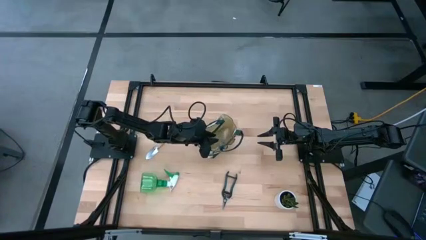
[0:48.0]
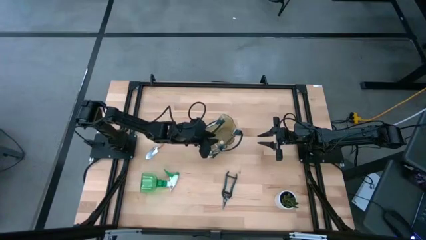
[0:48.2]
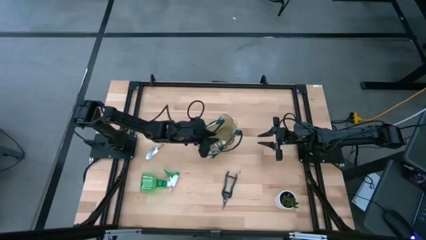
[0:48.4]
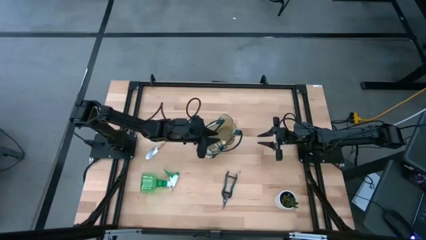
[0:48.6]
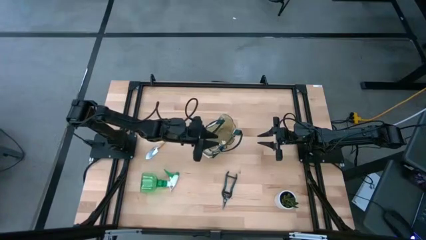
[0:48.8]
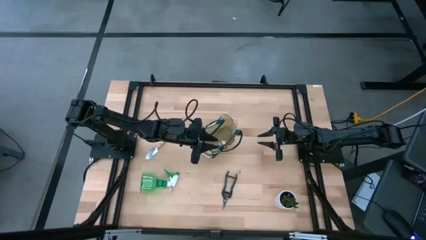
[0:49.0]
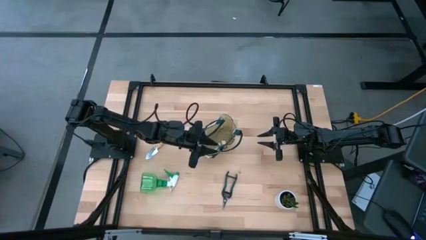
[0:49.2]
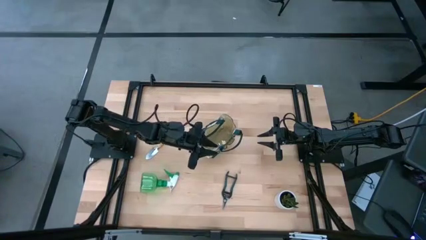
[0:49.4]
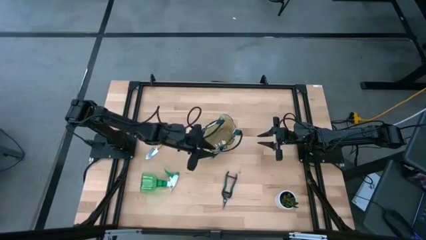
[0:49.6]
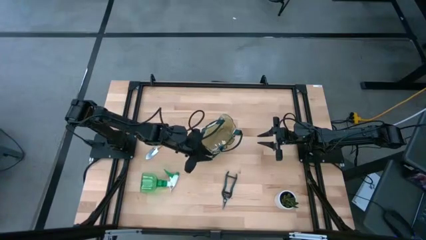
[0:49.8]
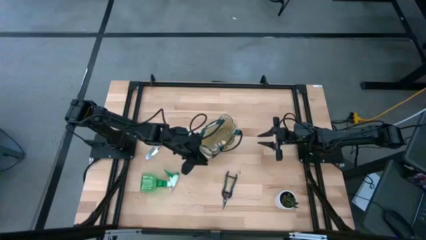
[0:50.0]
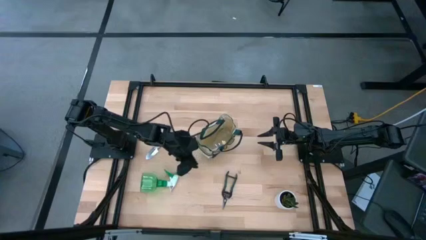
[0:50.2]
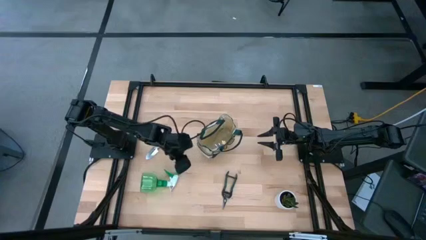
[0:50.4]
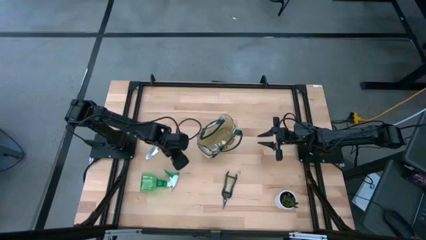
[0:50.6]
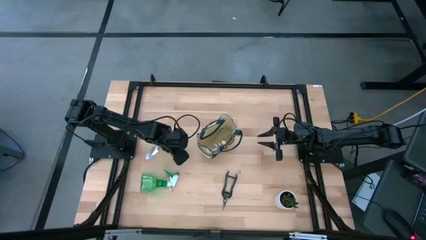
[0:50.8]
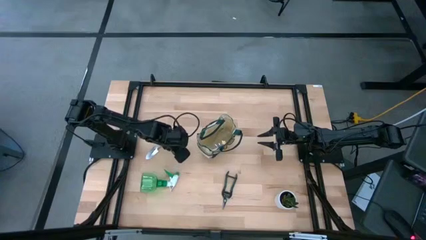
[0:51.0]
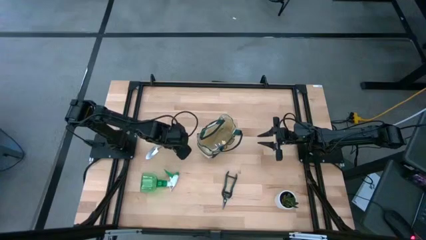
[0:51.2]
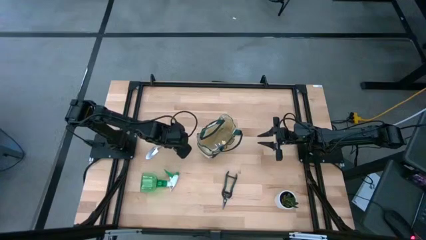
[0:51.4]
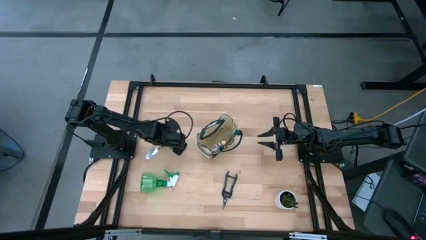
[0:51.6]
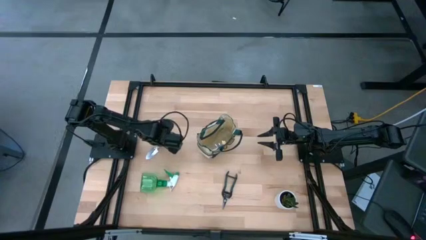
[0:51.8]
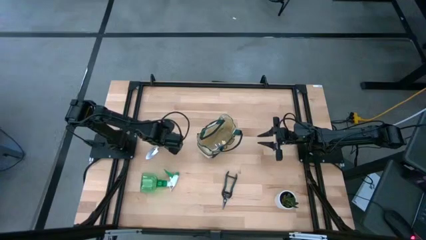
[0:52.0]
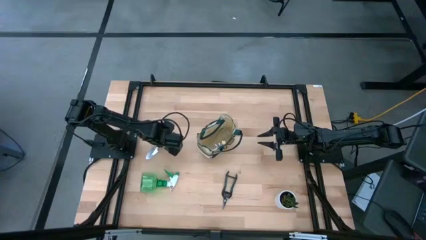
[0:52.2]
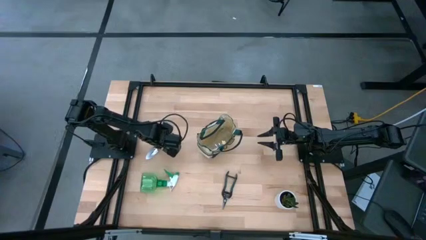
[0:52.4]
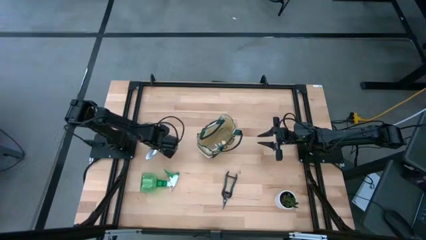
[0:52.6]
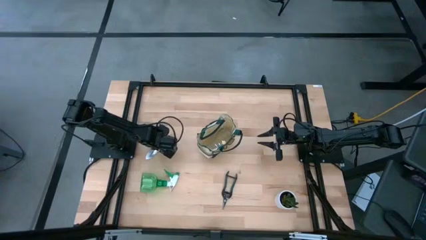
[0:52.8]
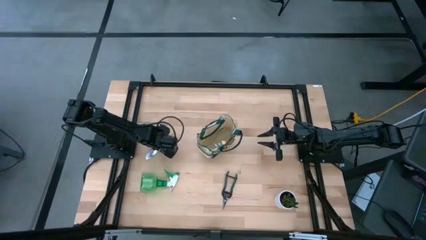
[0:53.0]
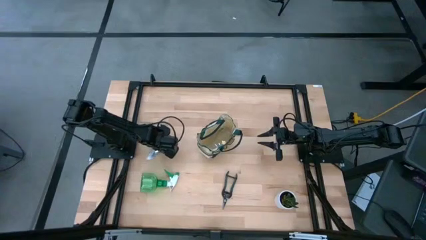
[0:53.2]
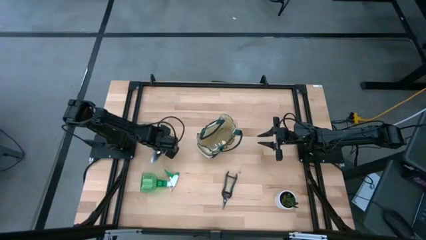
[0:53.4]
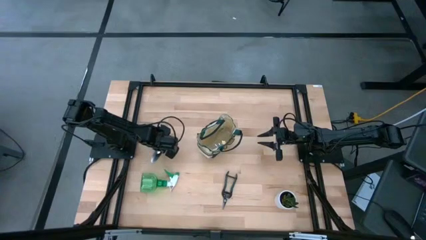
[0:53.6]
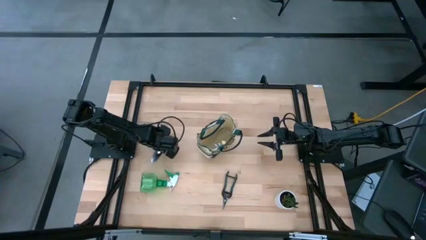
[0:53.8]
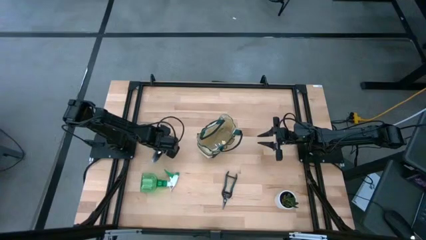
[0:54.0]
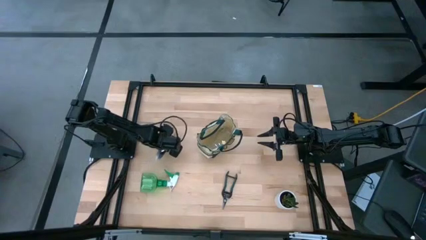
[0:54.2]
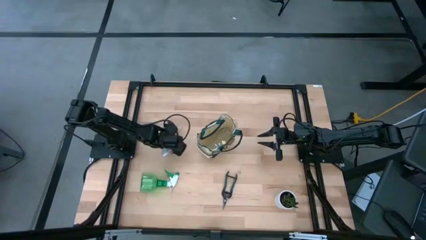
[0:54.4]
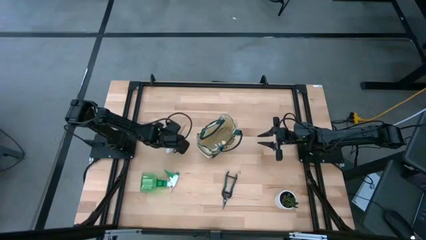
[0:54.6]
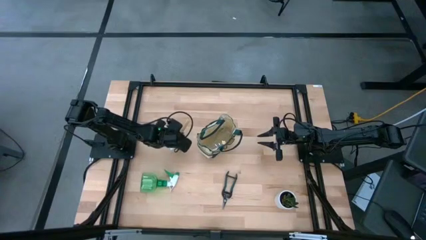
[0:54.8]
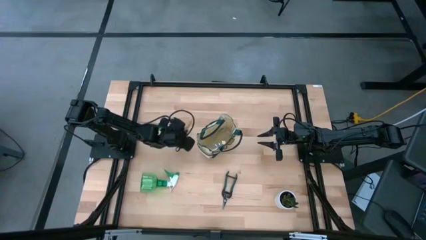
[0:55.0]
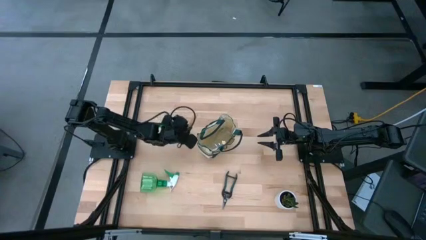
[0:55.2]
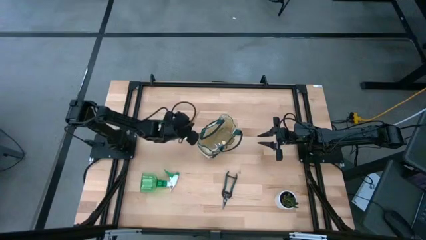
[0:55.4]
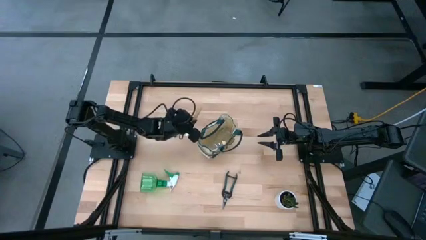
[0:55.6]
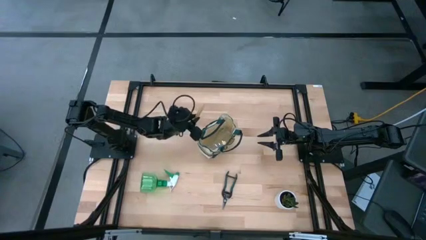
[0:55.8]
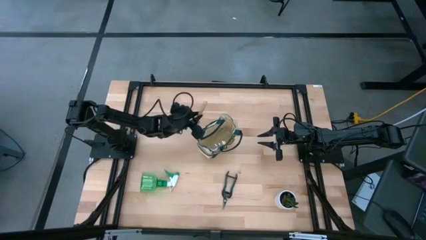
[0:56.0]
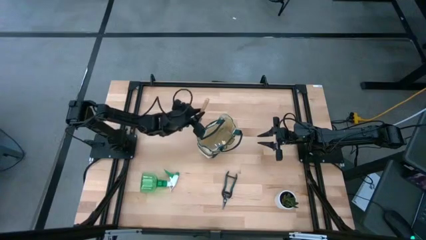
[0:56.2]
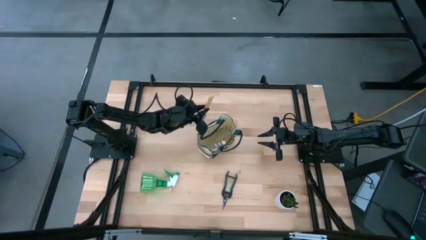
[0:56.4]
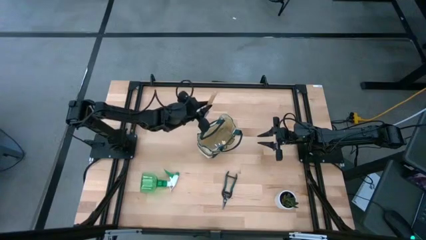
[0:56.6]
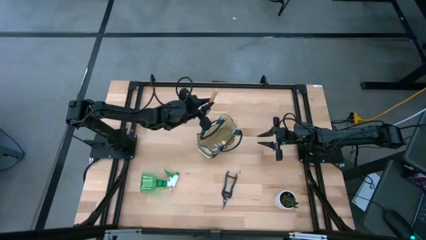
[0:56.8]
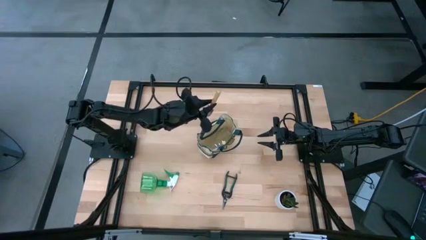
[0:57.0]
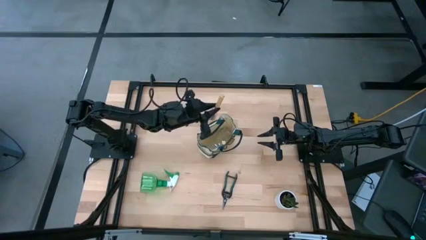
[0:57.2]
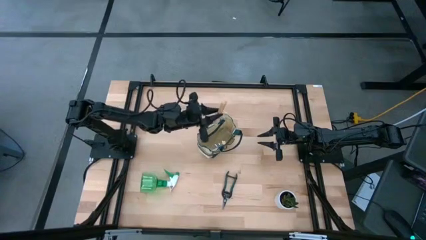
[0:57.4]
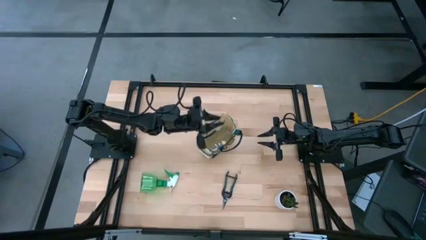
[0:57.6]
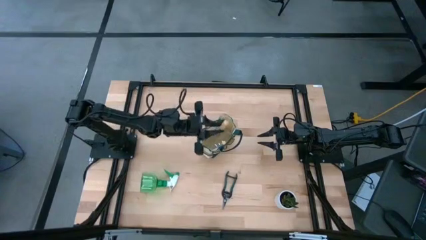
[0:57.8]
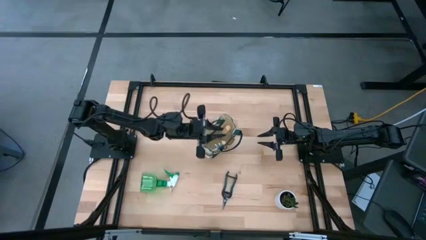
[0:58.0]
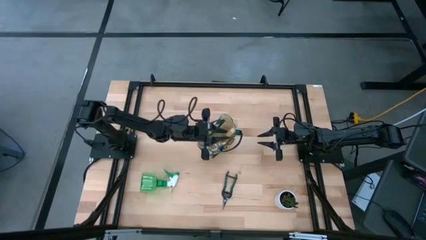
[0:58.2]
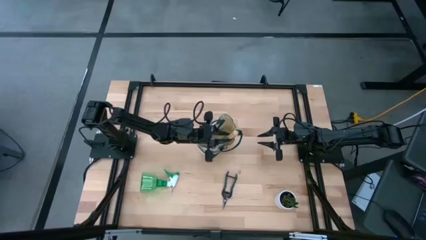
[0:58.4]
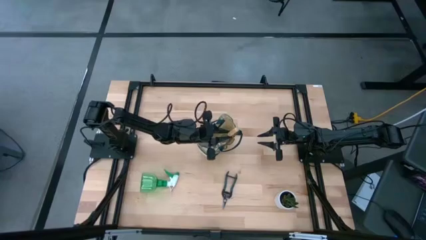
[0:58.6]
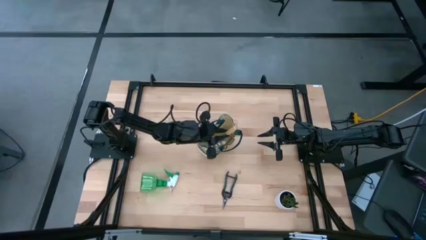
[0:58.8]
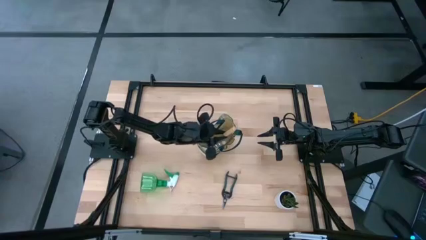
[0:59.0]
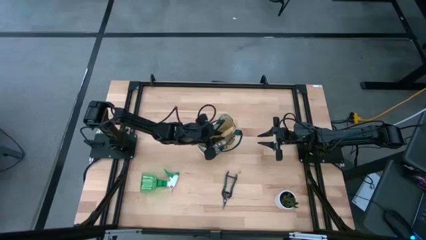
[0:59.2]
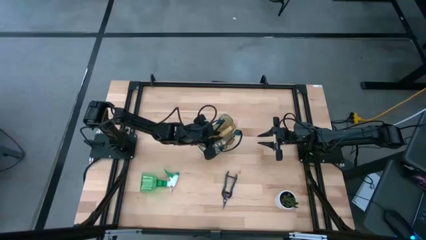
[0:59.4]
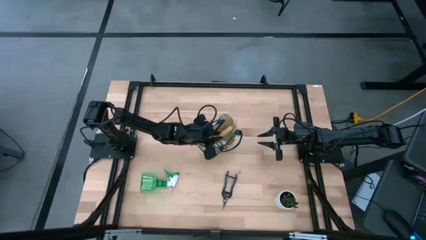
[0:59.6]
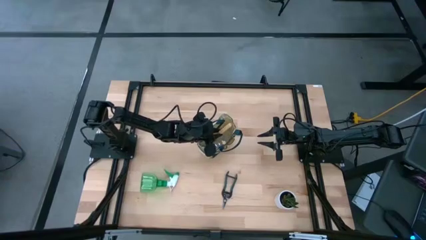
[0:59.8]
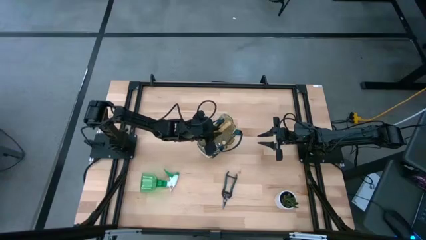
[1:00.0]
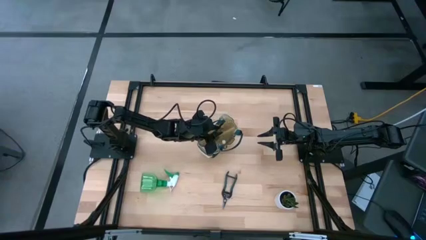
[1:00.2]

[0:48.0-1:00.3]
Task: Pick & Place Garden tools in Gardening bag
Put the trowel into the gardening bag

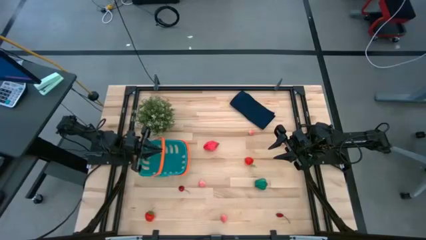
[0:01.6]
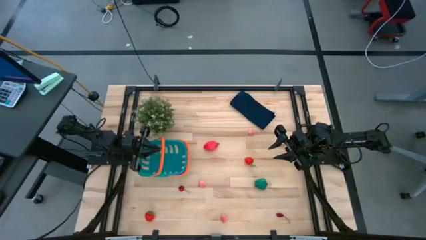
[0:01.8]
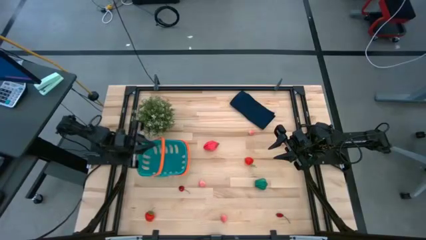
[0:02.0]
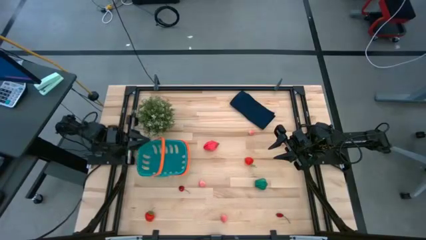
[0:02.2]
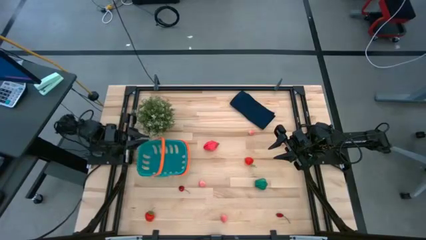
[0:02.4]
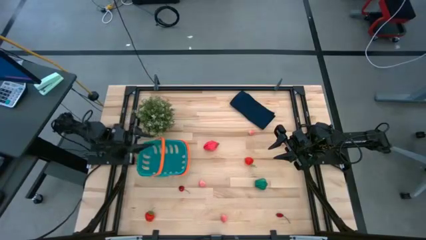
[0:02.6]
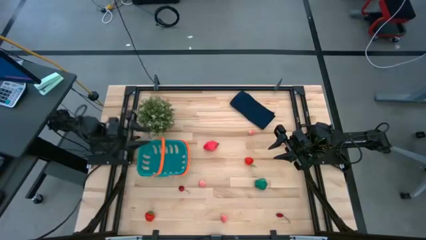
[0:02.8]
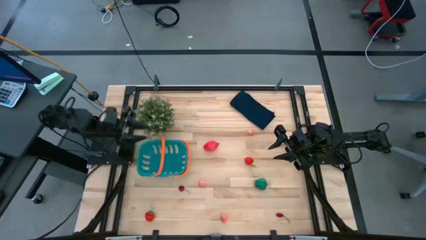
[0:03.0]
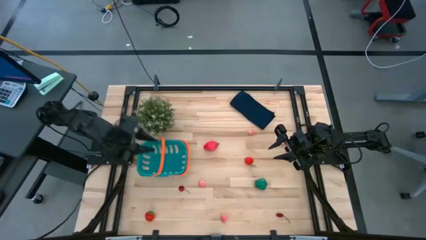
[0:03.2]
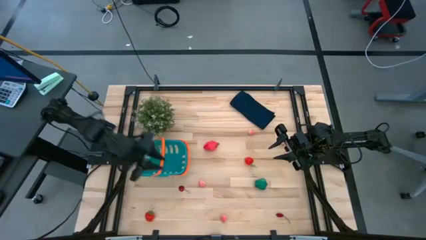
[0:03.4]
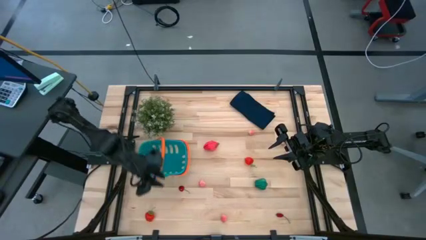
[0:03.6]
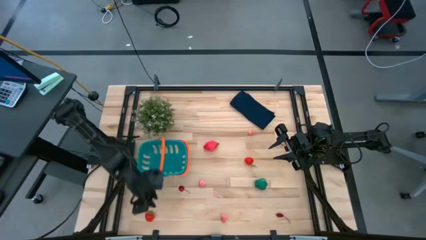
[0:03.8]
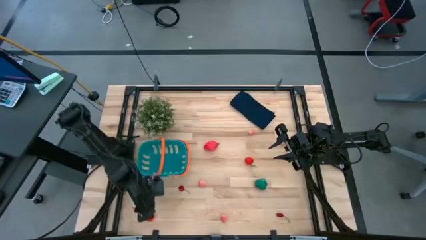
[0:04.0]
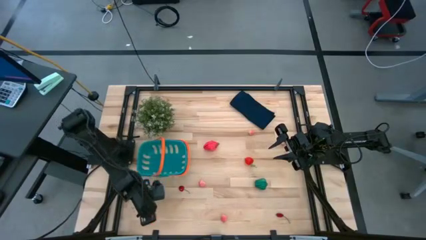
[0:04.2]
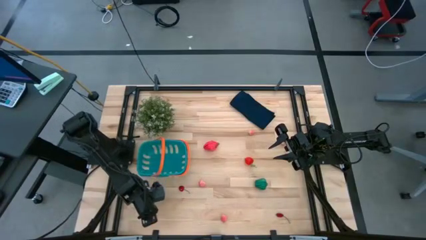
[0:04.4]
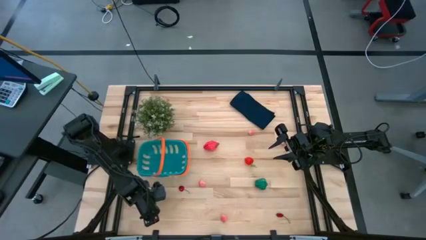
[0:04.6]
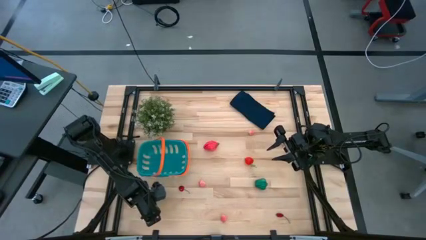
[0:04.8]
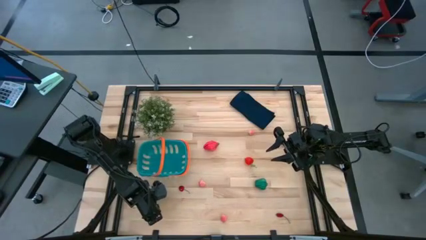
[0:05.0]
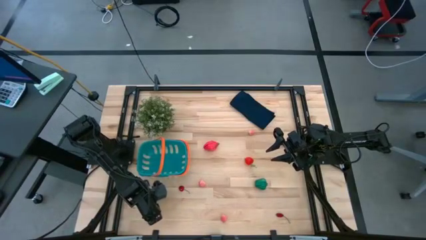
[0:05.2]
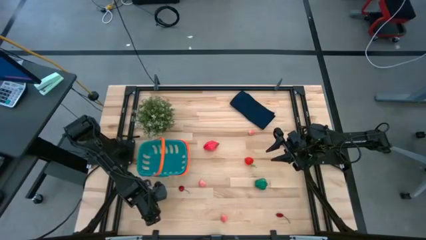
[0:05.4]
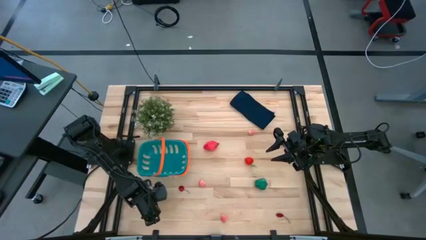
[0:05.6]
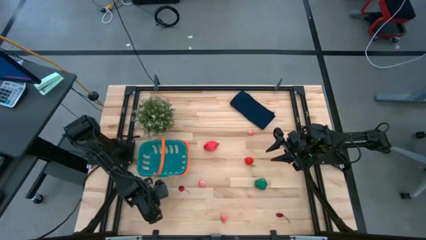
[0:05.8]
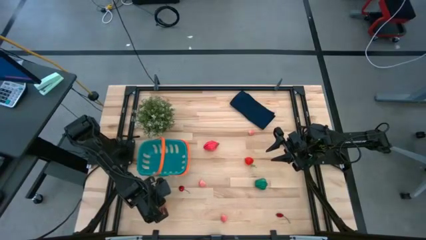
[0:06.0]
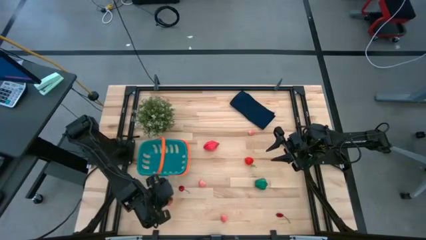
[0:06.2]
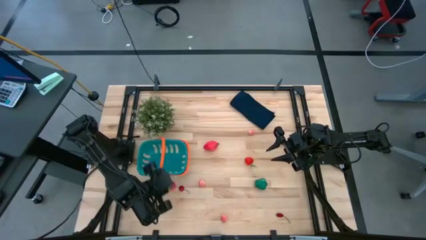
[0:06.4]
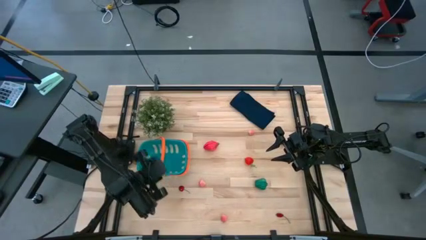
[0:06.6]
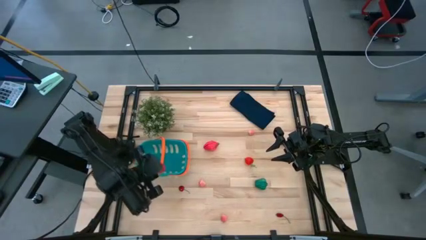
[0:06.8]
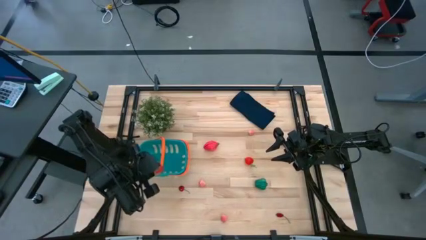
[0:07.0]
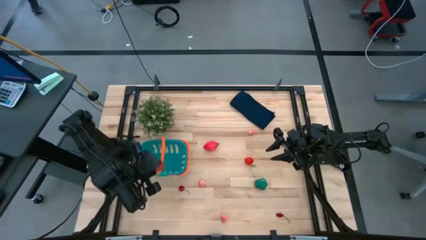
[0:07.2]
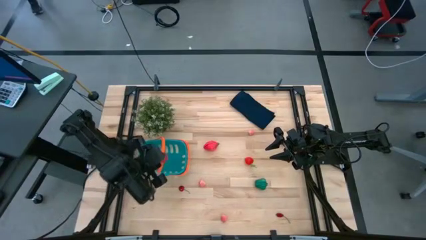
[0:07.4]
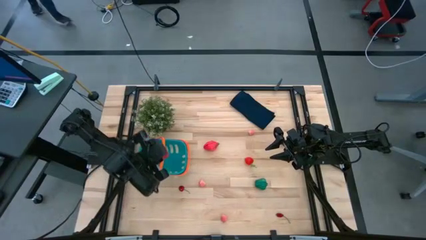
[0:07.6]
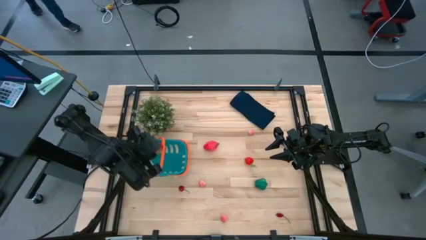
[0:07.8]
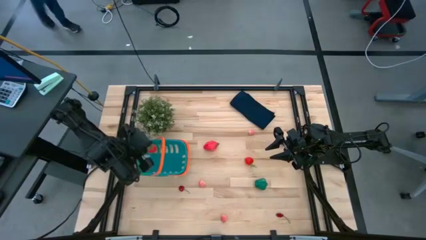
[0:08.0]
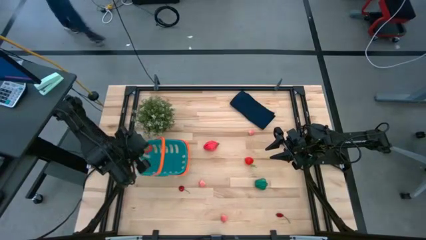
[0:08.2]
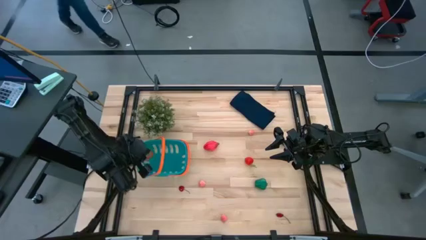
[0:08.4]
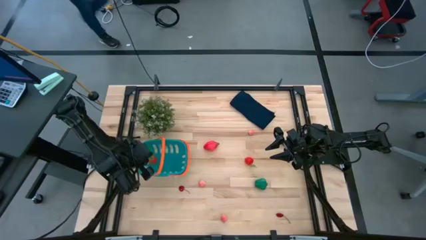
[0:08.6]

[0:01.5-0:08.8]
Task: Pick and placing Produce into tupperware
Put the strawberry into the green basket
